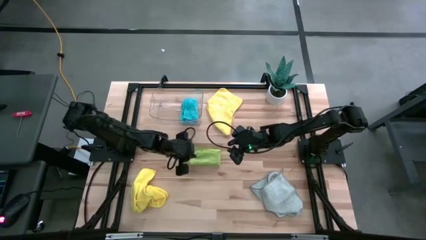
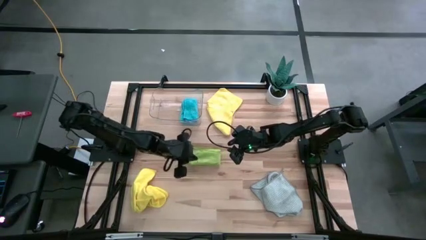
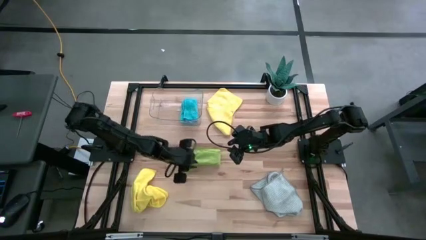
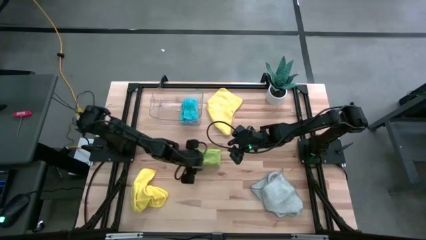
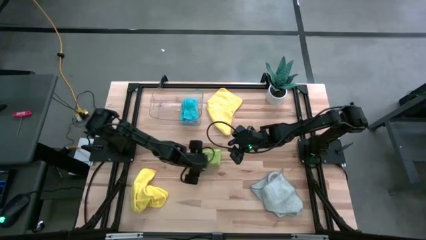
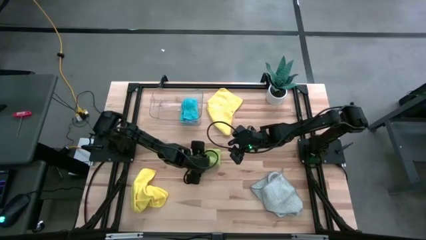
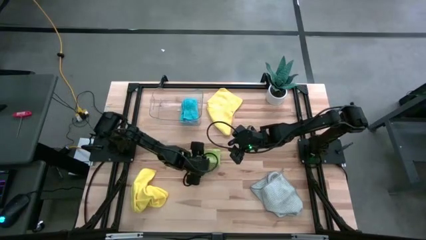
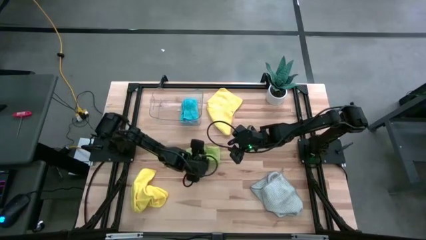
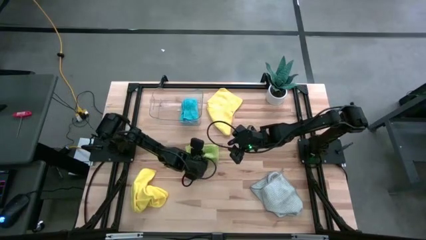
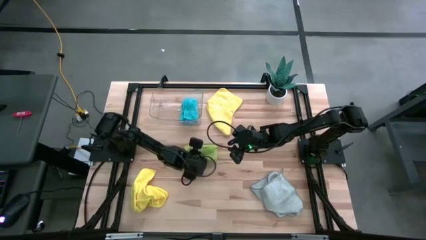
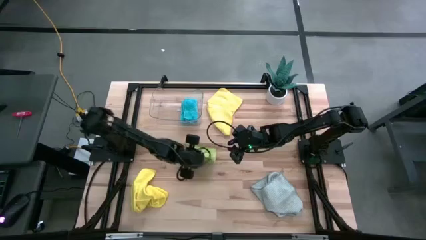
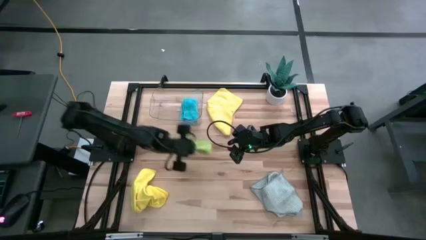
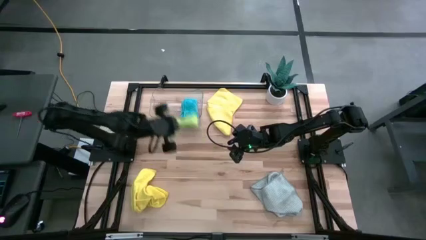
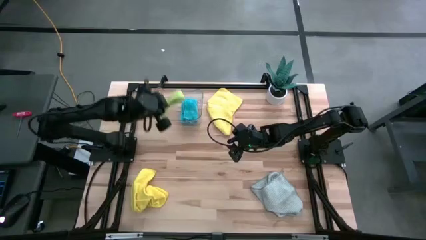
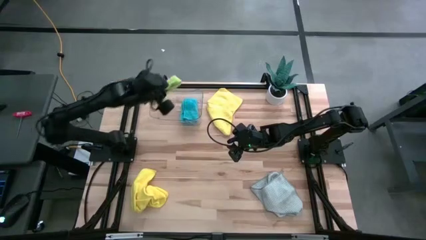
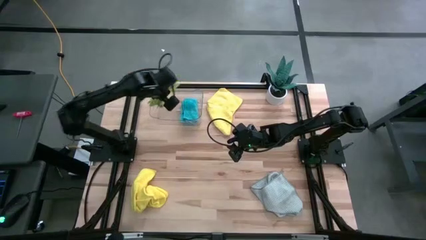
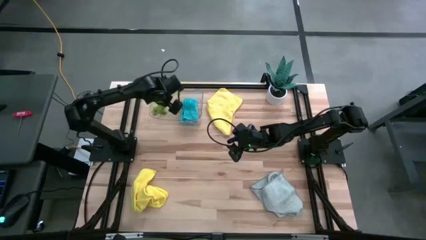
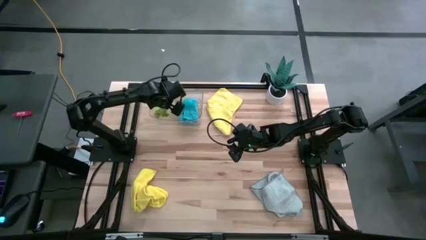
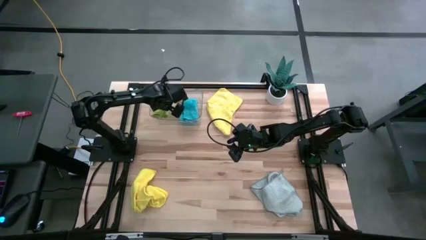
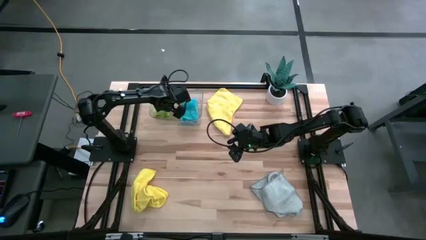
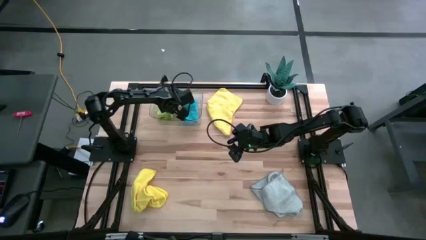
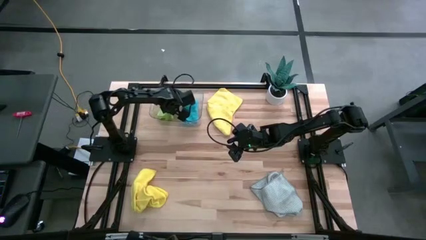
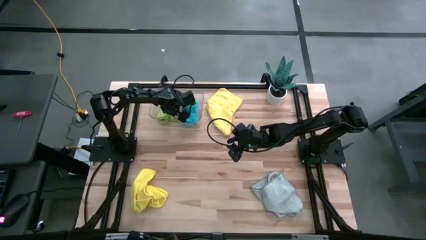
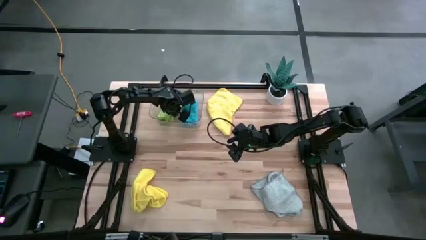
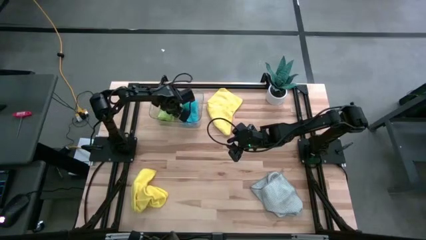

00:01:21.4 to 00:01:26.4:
Task: Fold microfiber towels
Put the green towel into the transparent bin

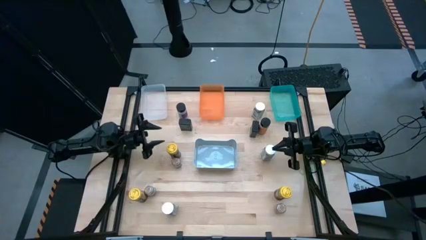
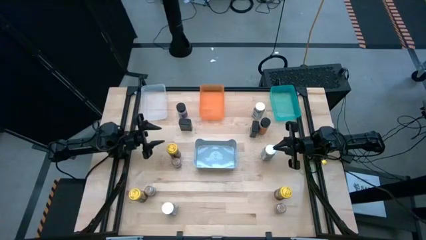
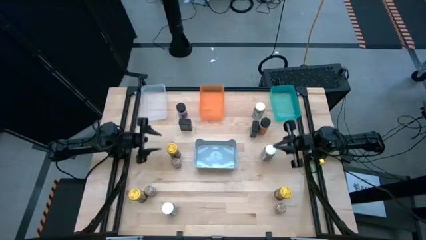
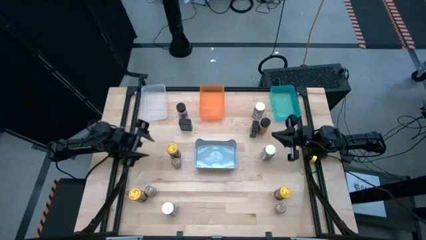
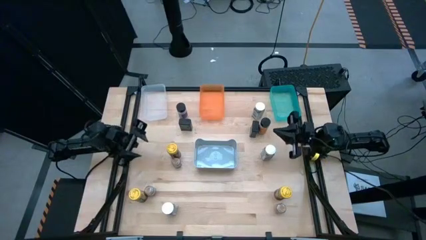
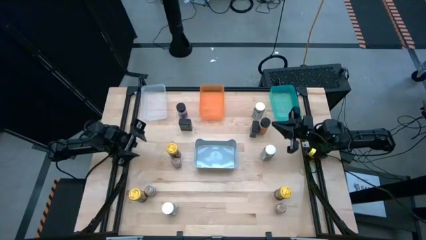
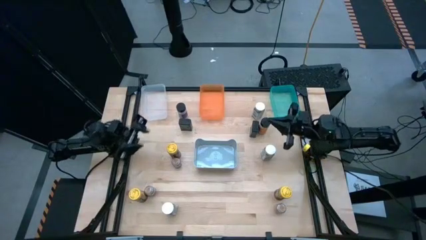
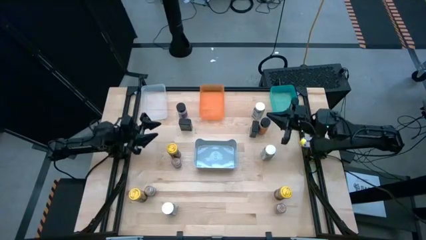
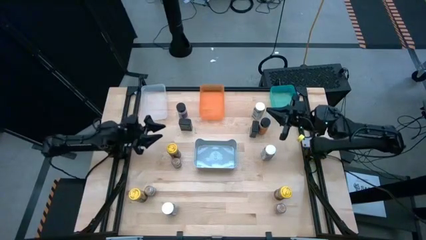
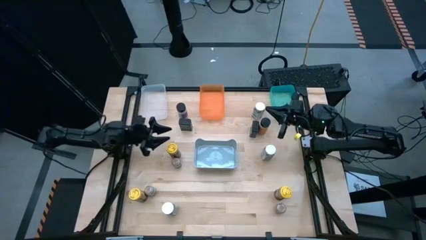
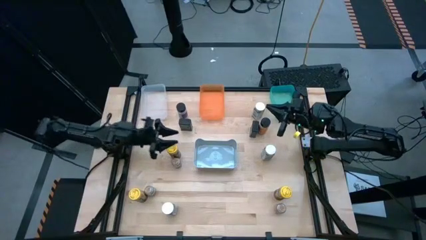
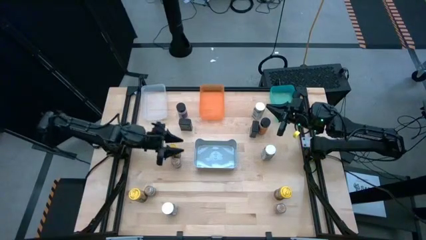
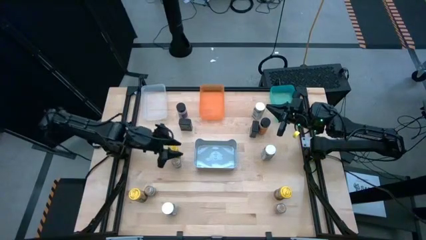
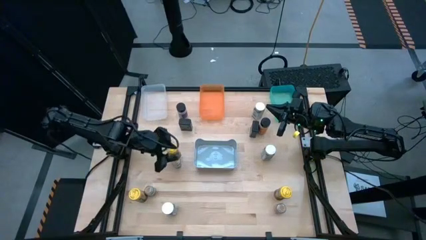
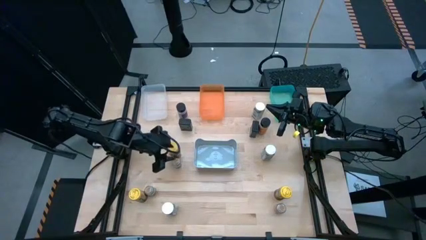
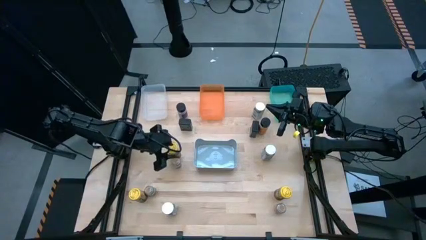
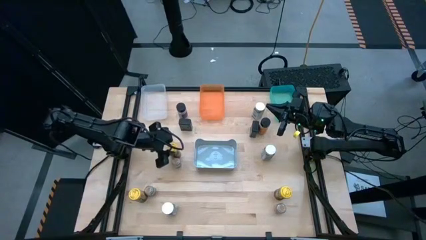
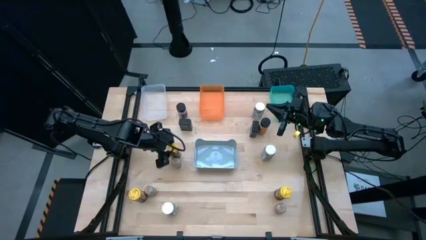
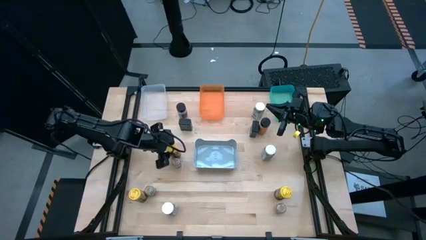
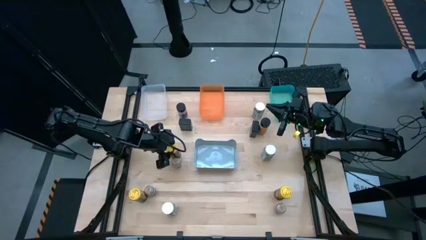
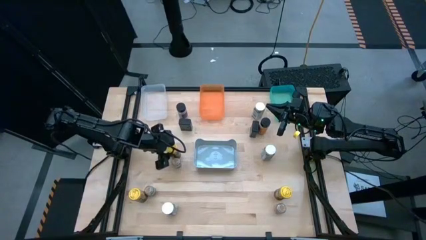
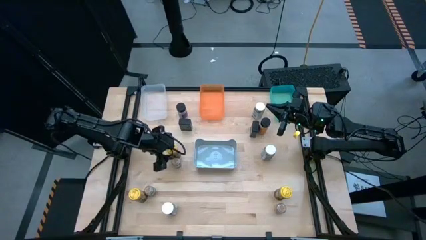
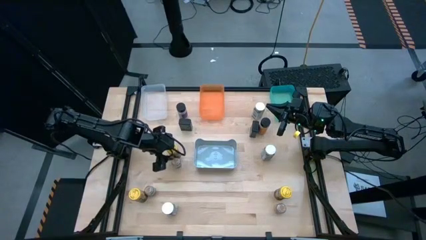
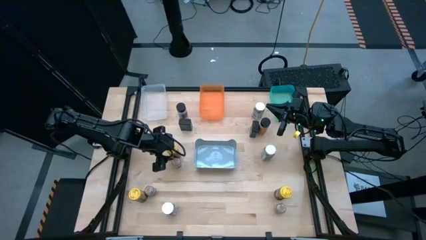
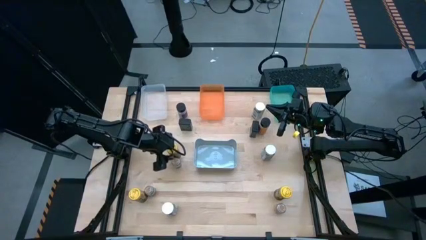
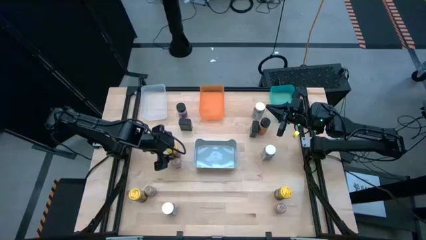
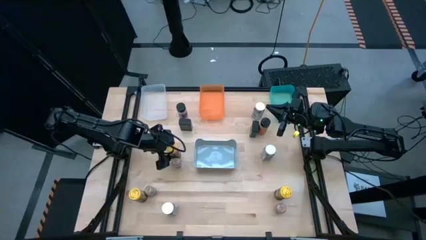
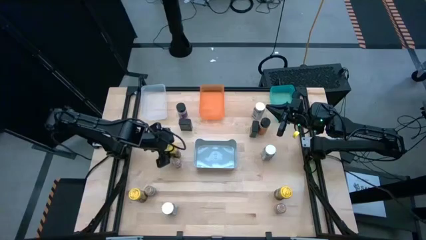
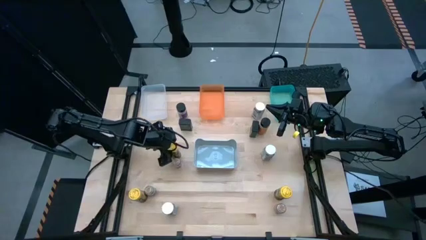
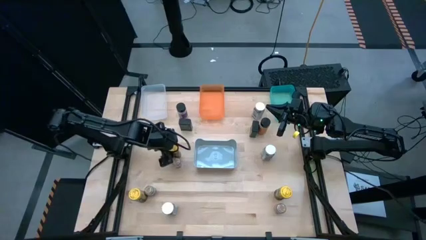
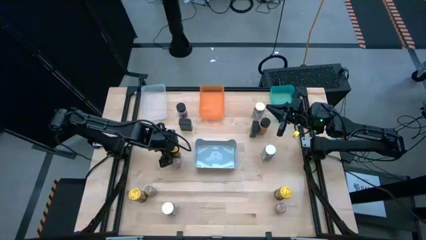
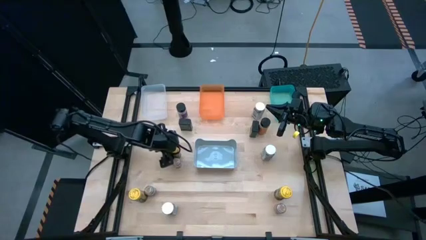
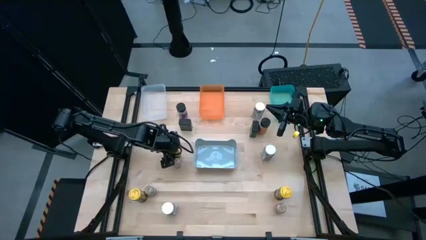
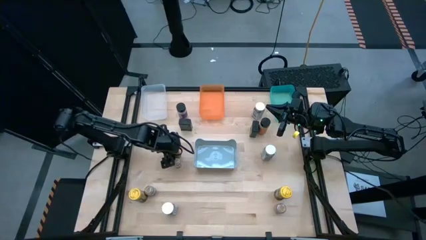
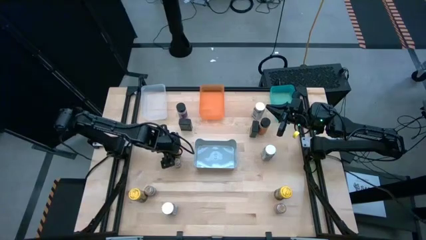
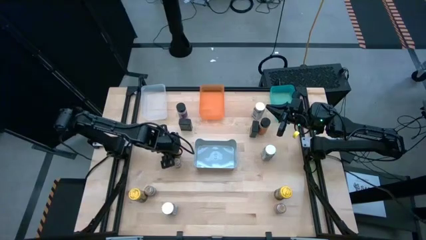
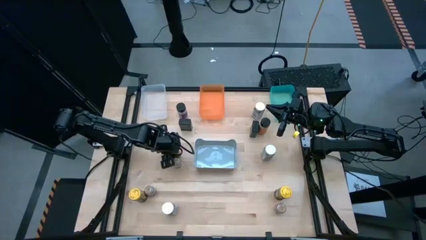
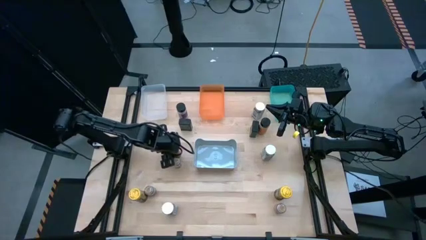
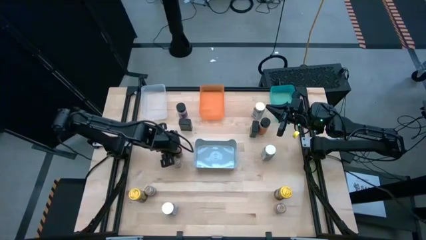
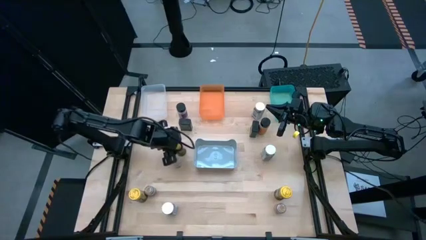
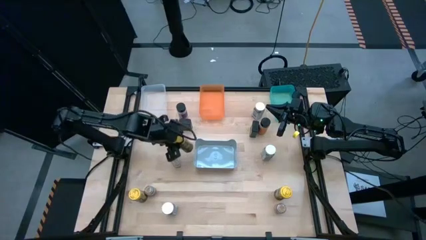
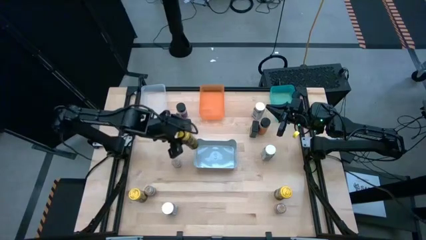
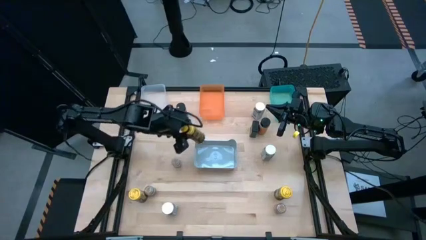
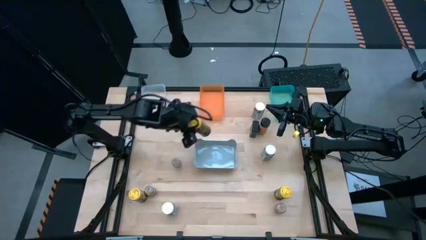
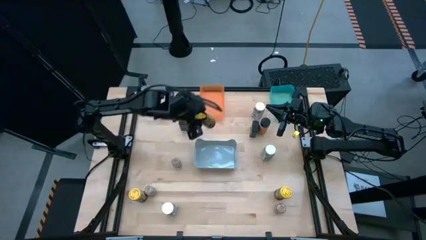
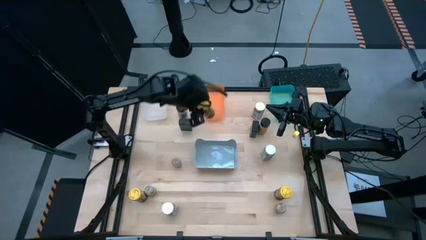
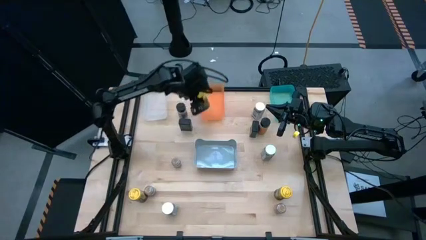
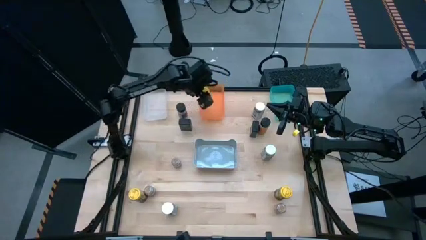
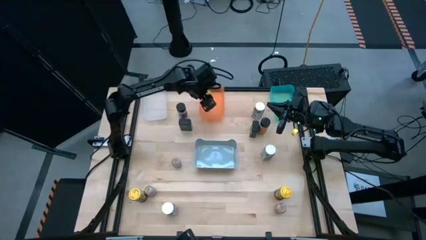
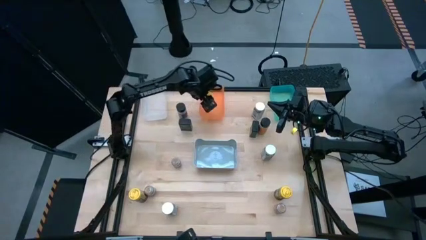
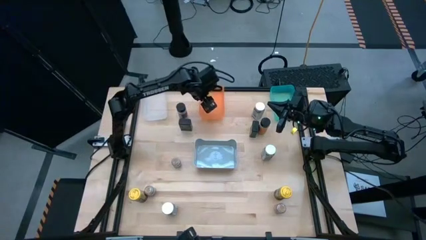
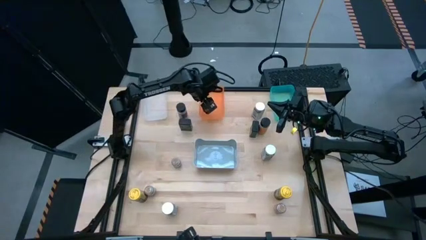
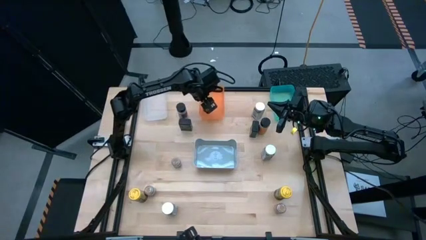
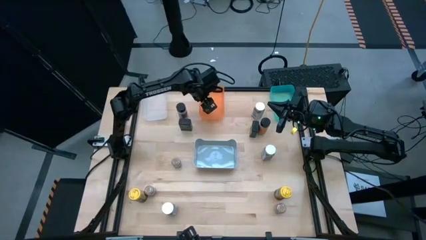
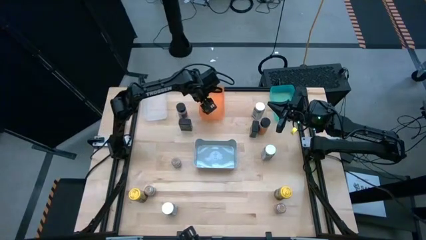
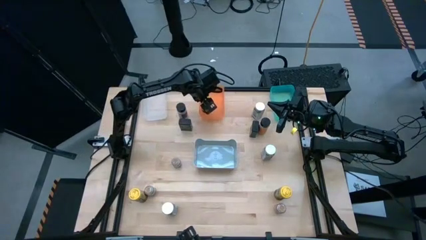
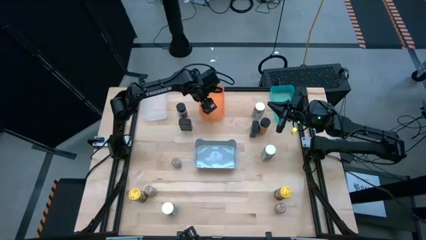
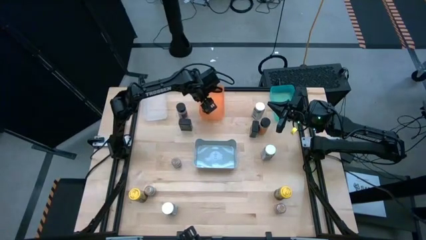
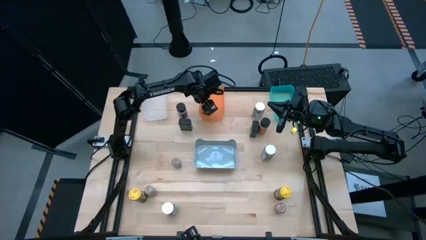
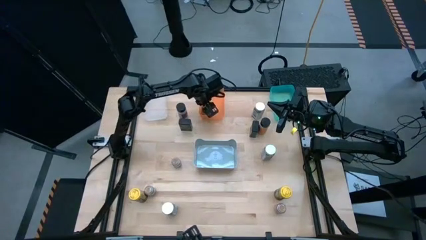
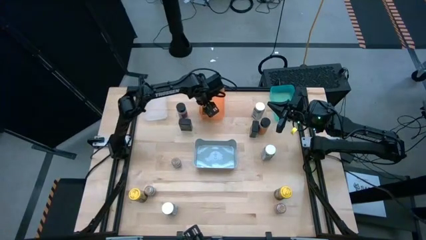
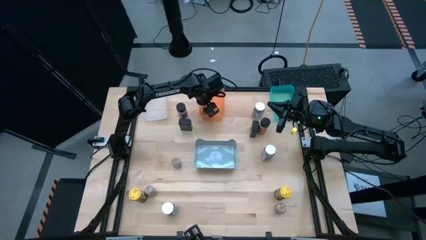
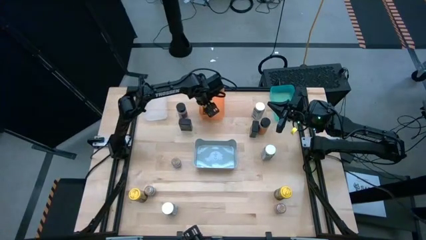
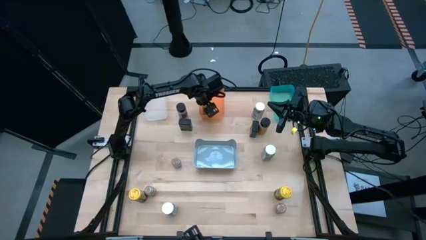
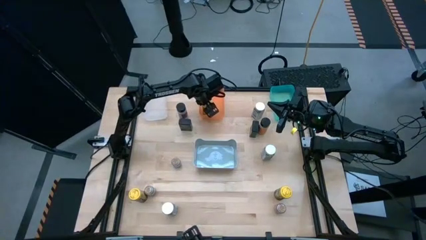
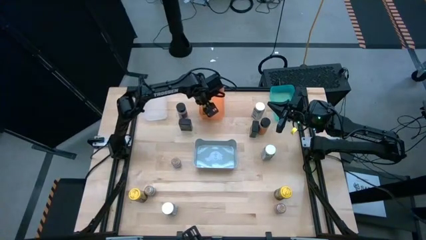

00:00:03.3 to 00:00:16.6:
Task: Sort spices by type
Put the top yellow seasoning bottle into the orange bin
